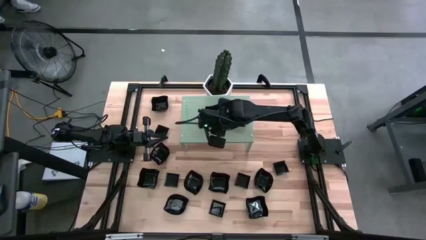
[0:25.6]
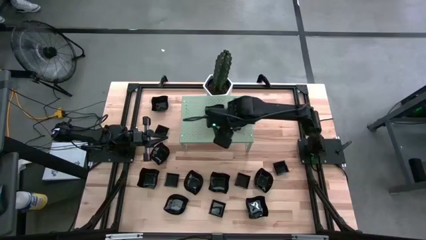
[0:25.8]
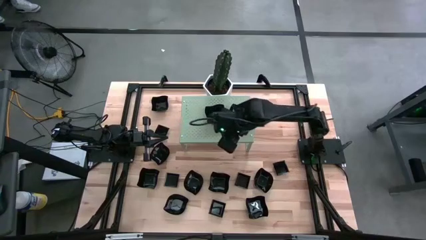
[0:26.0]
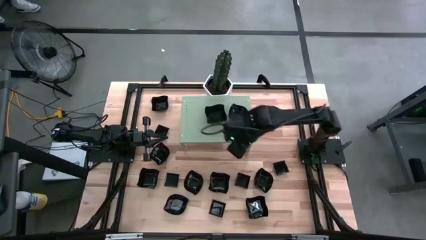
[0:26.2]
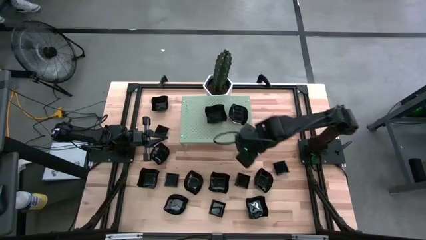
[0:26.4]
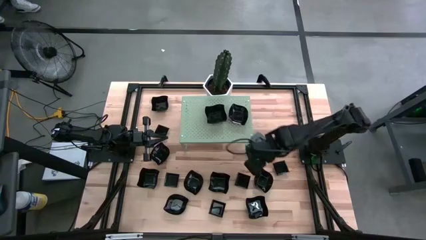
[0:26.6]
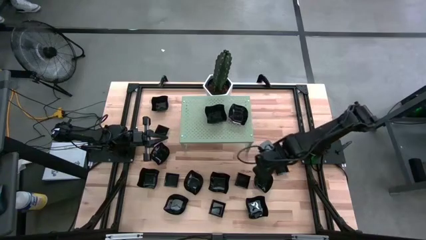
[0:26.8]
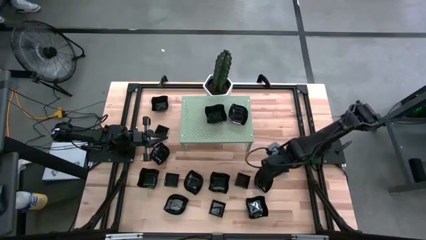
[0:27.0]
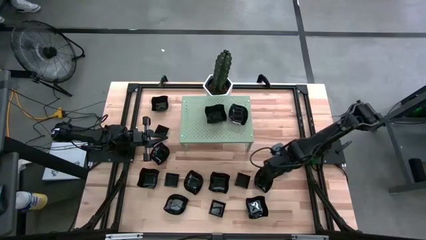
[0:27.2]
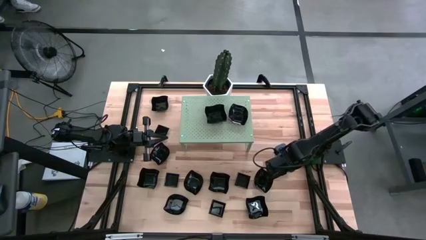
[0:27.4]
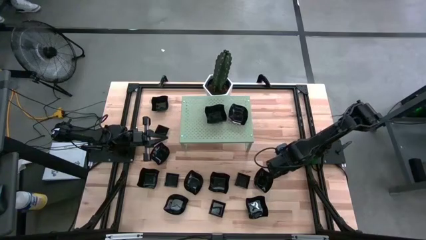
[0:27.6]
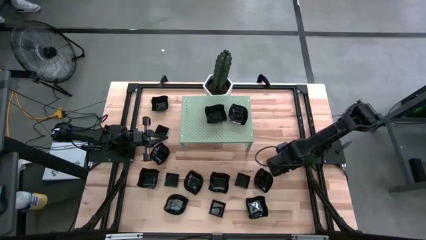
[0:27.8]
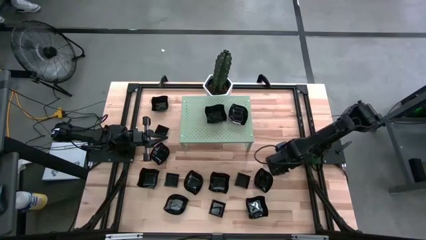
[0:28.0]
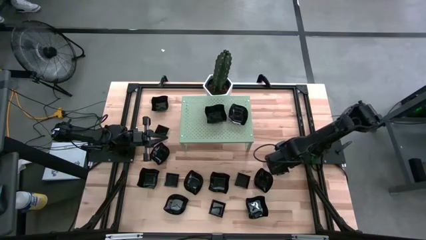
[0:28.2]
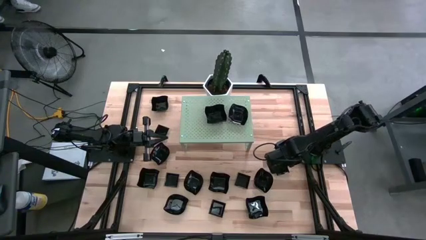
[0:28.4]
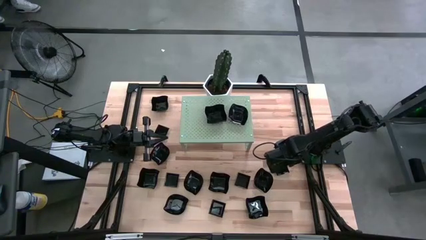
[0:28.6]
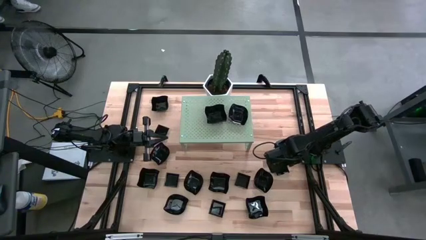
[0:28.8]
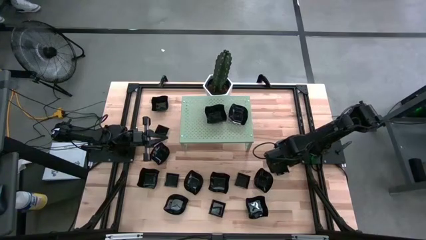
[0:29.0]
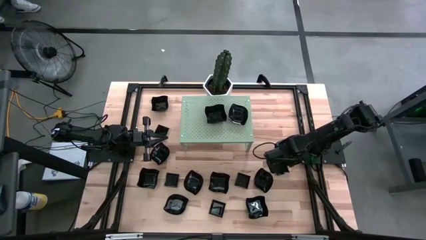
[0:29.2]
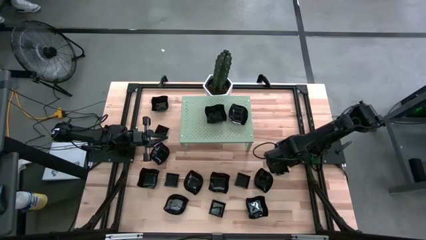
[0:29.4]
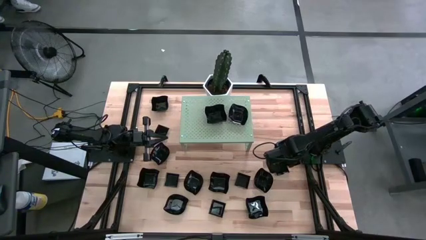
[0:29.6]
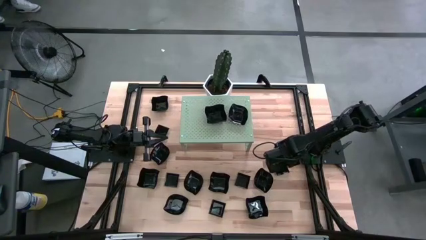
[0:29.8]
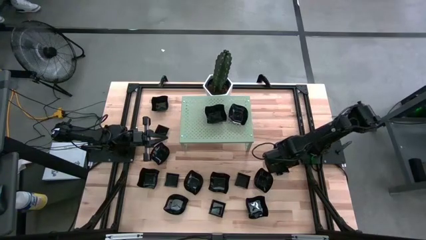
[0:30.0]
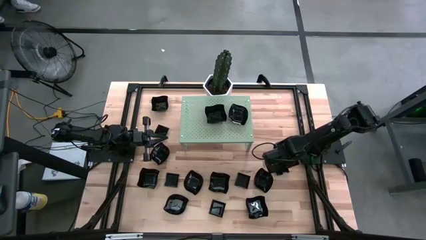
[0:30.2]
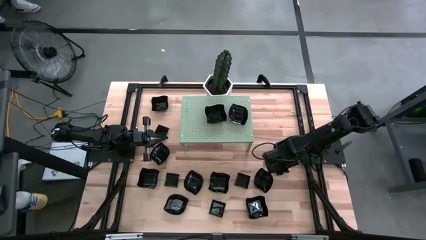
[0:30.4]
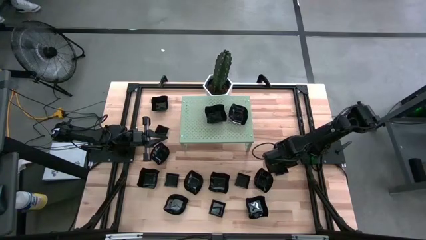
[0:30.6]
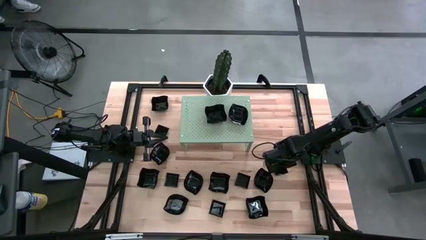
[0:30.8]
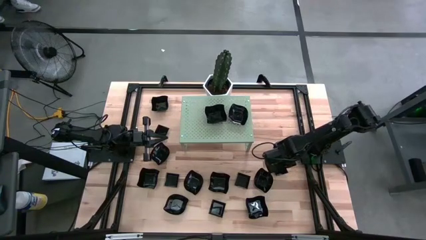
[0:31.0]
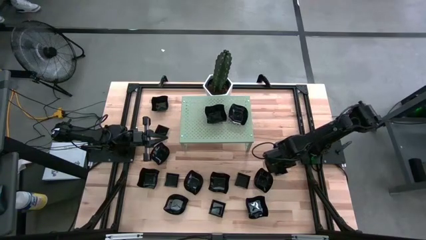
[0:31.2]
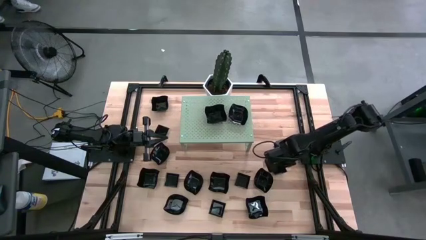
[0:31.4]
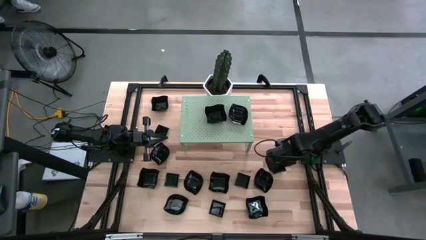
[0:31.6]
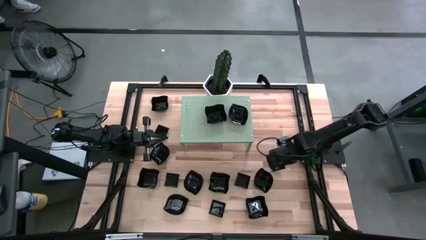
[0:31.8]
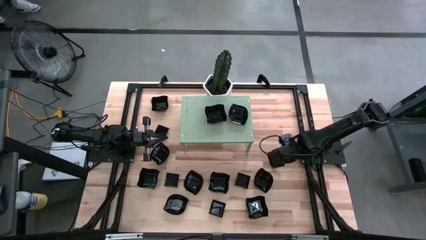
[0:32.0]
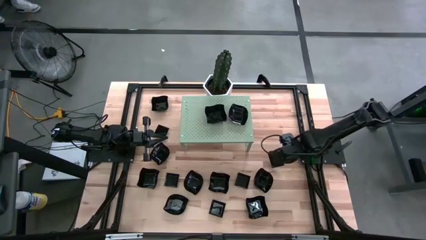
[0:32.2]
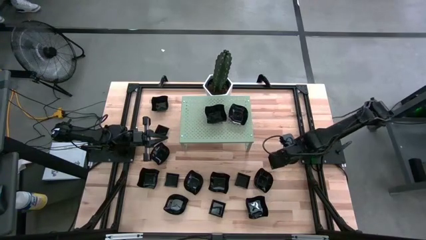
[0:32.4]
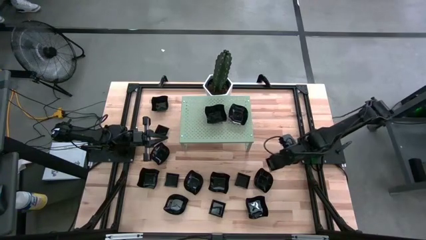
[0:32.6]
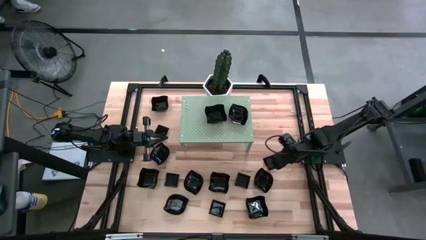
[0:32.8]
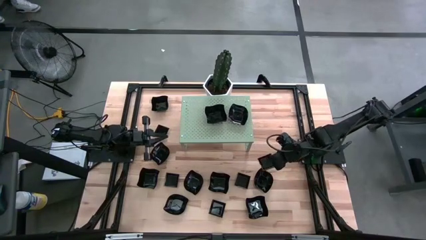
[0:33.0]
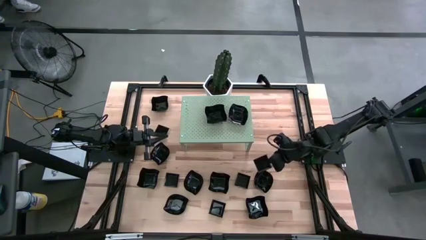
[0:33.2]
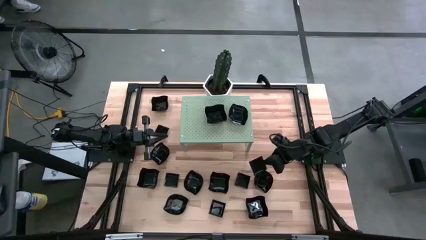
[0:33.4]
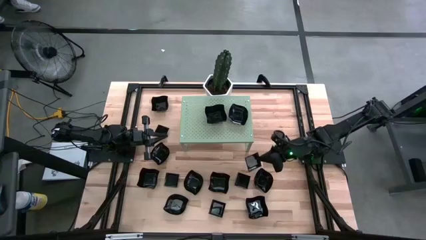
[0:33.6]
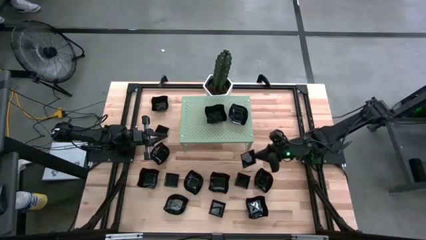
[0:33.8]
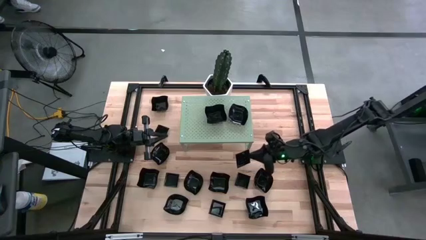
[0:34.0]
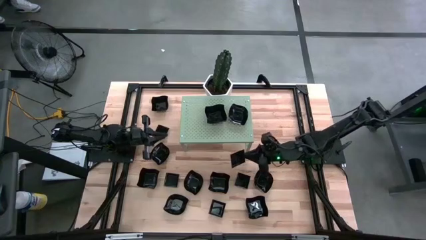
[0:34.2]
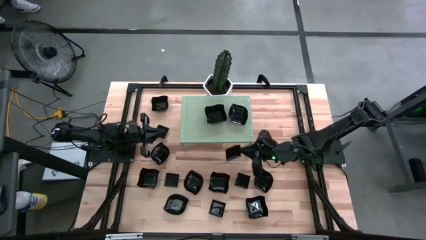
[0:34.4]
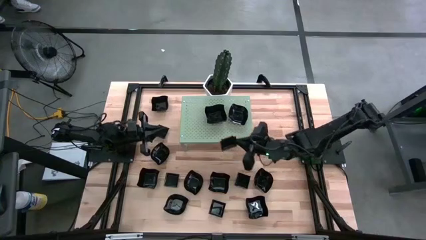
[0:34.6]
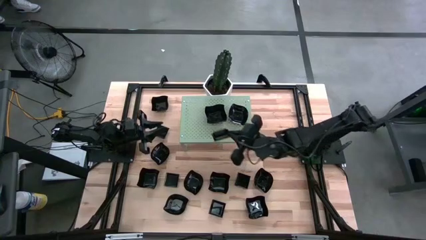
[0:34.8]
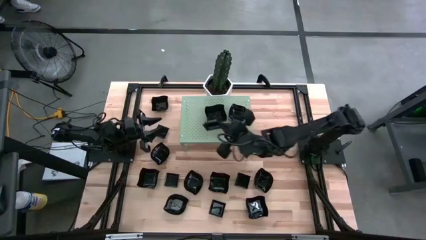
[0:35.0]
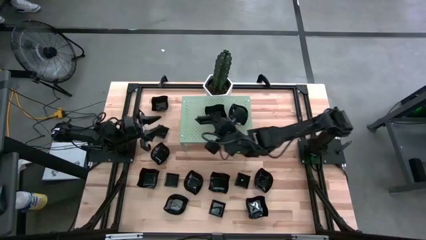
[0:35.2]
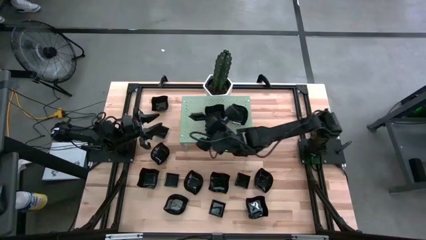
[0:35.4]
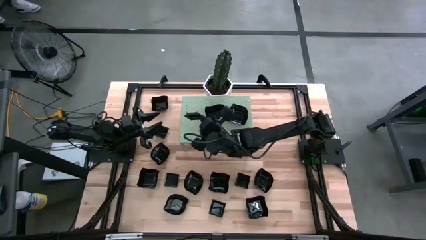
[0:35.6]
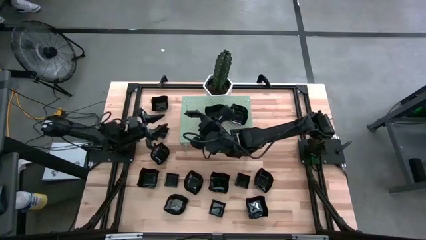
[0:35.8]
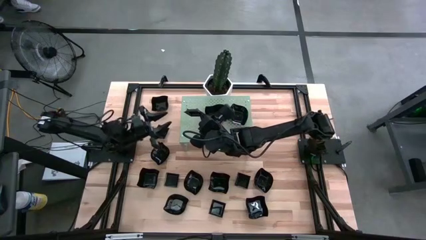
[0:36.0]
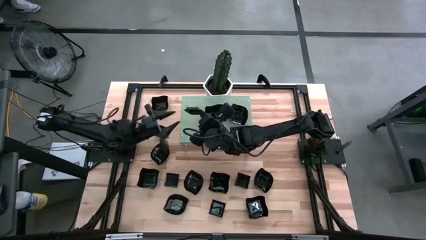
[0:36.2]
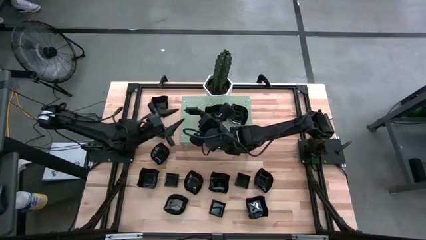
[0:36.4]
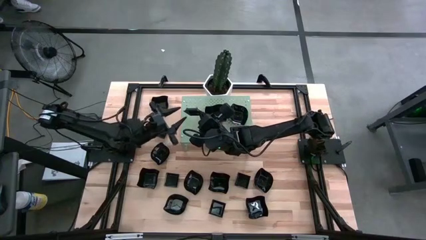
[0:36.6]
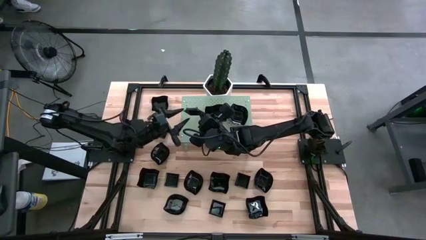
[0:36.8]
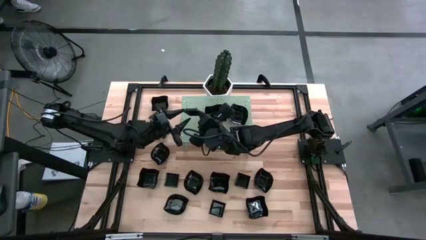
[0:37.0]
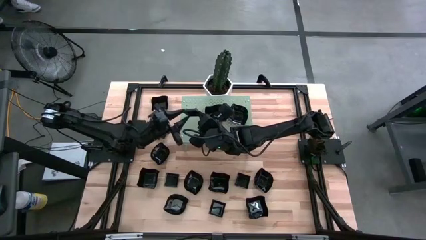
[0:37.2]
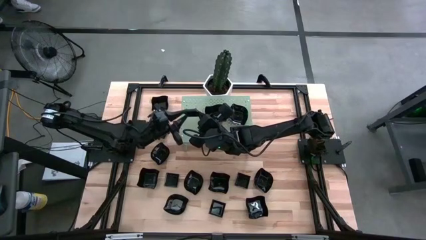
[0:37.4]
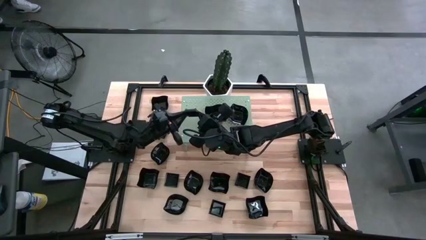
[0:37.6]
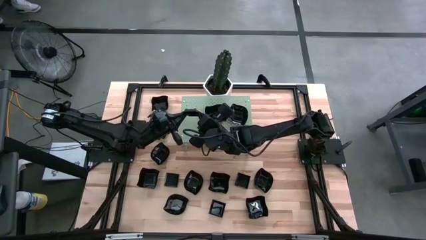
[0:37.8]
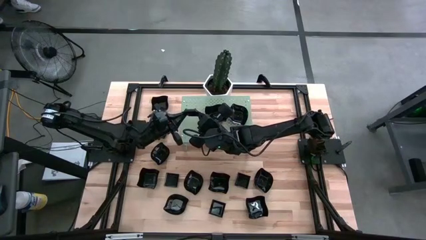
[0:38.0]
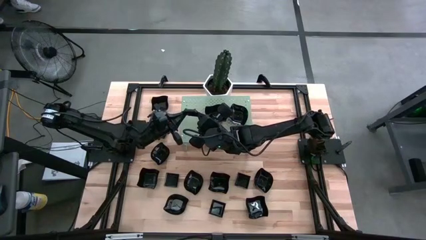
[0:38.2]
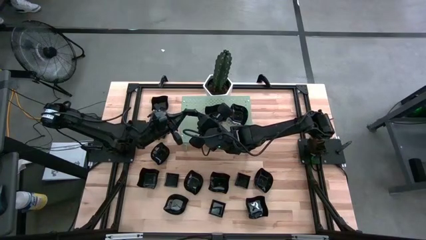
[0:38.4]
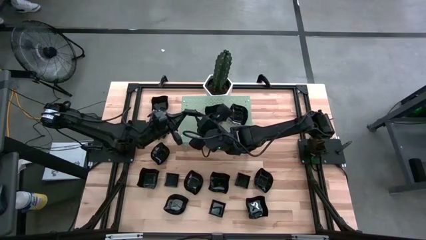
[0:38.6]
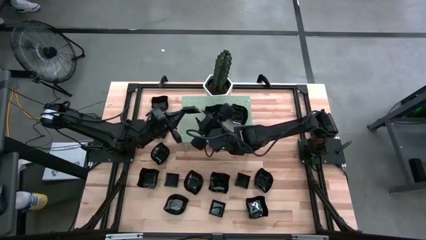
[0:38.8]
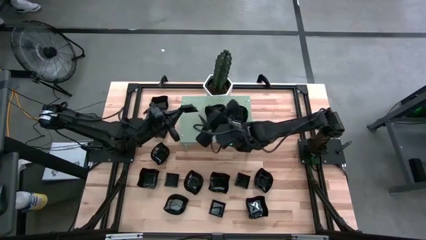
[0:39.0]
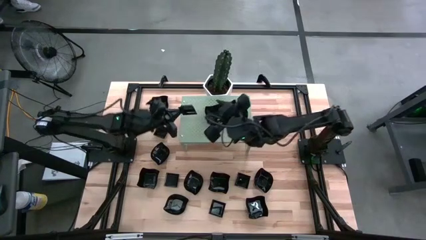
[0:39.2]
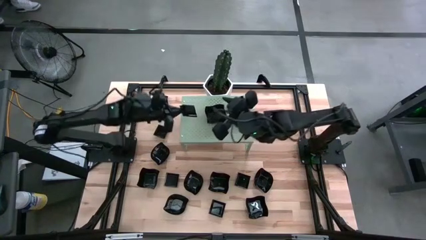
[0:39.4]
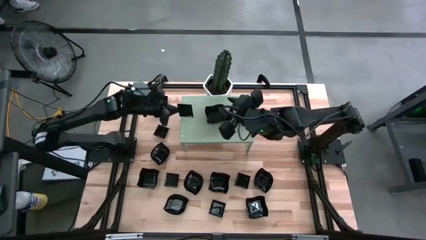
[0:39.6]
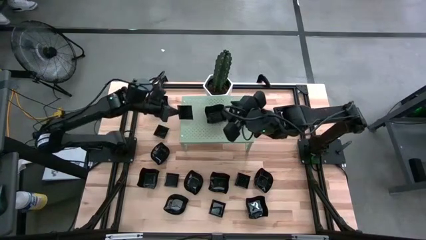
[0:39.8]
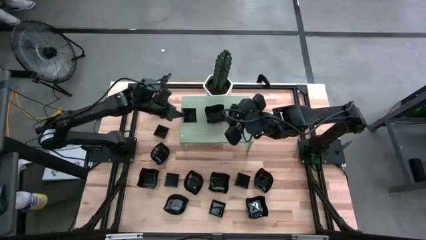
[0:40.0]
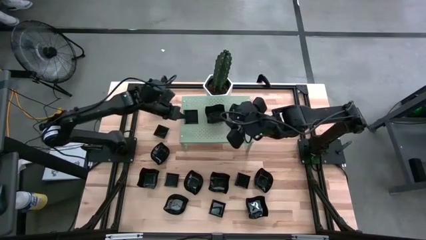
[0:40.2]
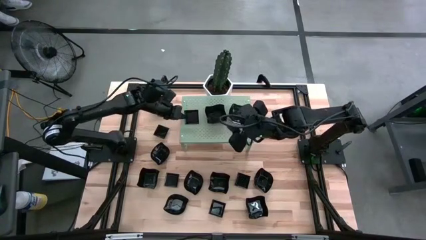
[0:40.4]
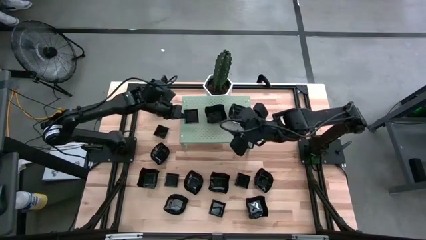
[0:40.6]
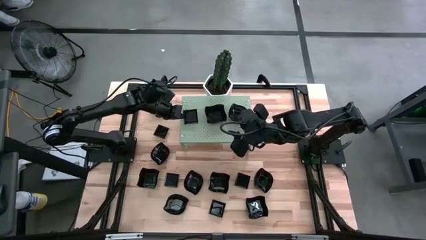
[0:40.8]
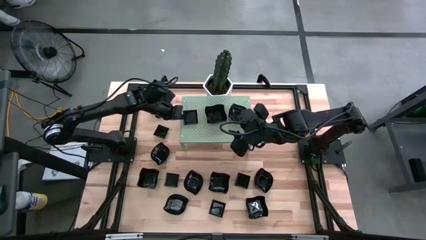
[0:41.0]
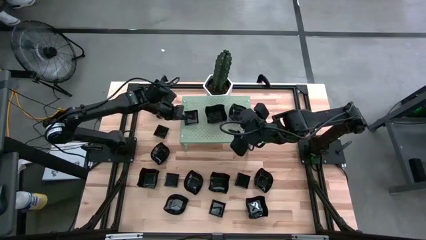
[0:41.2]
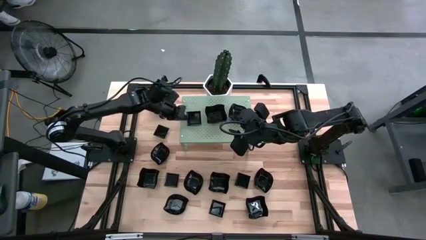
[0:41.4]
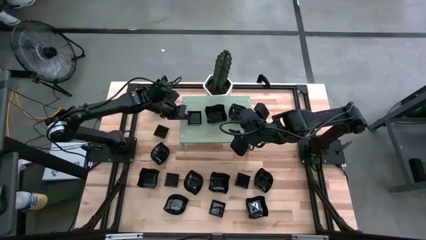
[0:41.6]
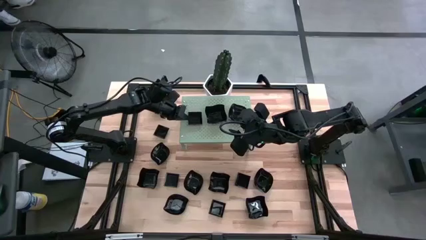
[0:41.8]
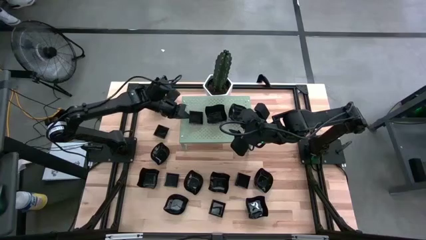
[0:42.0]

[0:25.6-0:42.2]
Task: Pick & Place Mini shaped plates
Put the square plate on the shelf
